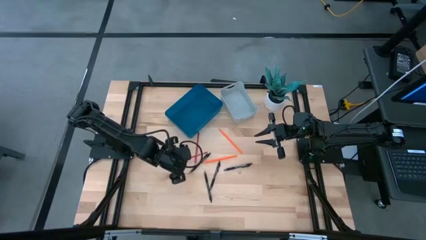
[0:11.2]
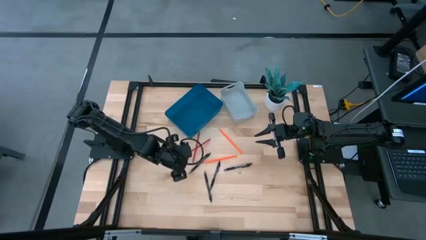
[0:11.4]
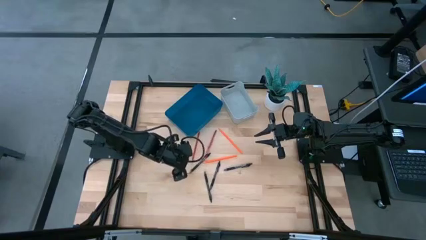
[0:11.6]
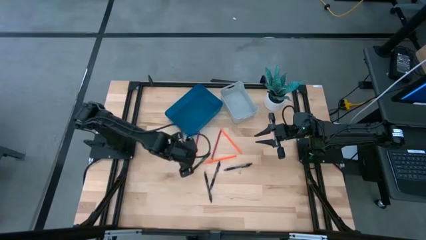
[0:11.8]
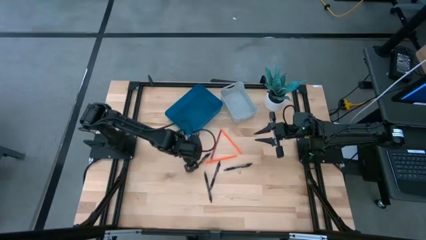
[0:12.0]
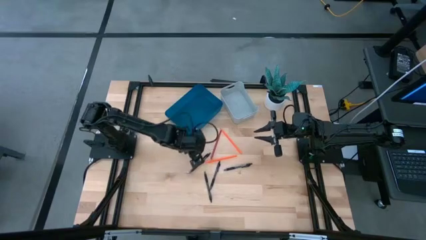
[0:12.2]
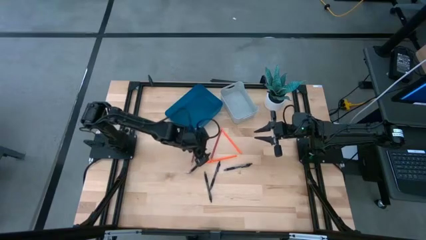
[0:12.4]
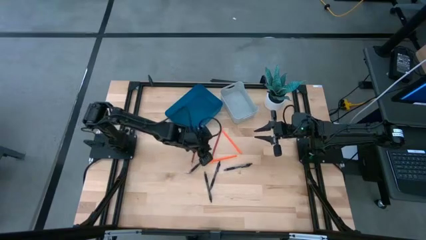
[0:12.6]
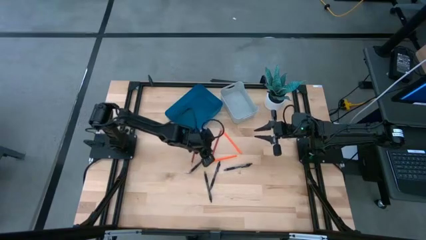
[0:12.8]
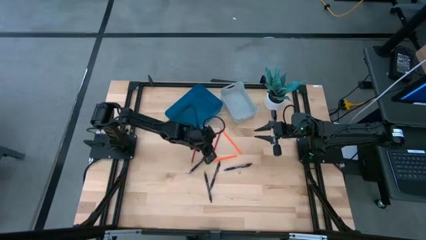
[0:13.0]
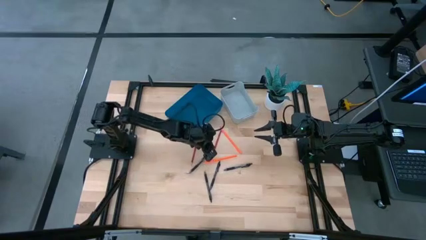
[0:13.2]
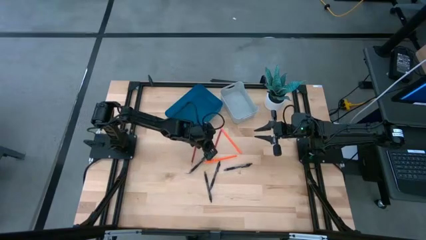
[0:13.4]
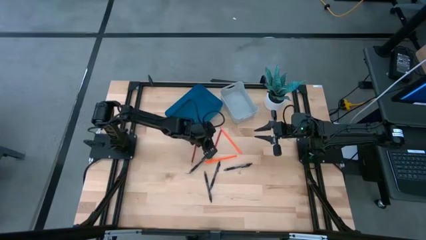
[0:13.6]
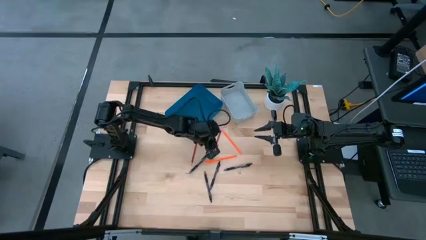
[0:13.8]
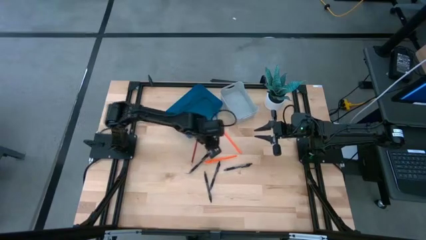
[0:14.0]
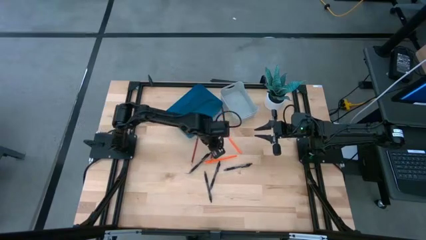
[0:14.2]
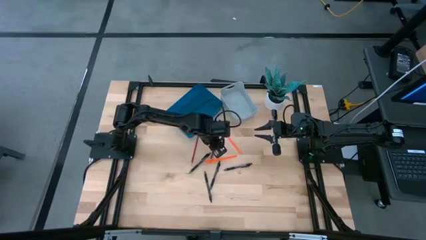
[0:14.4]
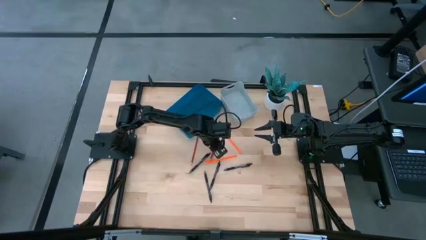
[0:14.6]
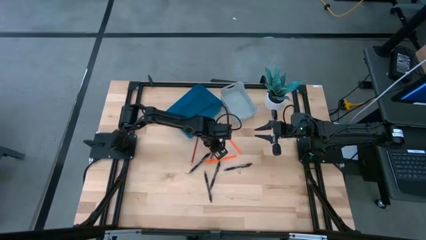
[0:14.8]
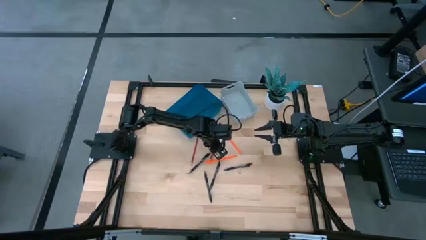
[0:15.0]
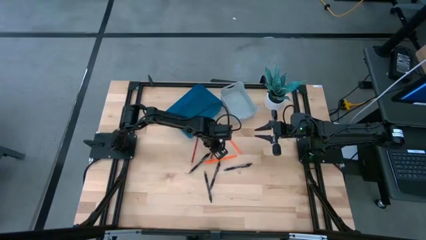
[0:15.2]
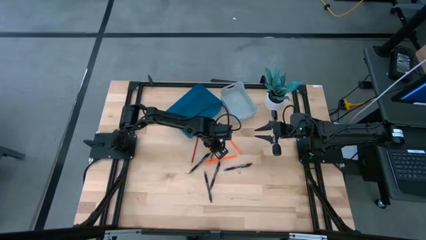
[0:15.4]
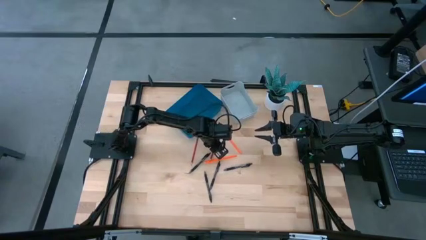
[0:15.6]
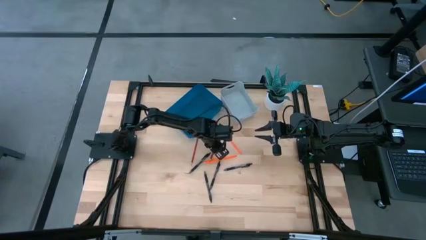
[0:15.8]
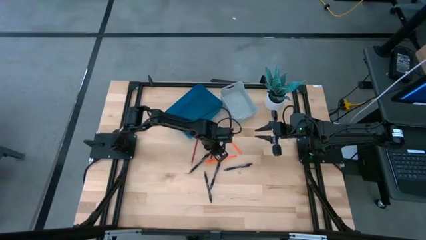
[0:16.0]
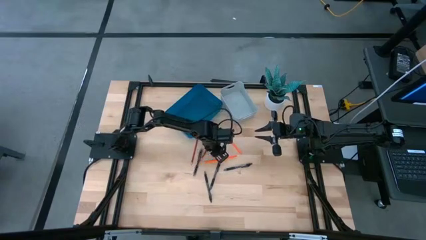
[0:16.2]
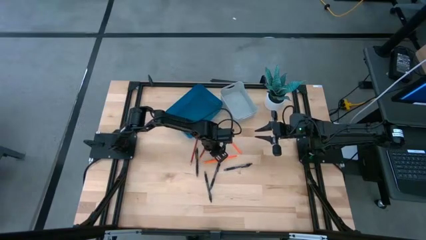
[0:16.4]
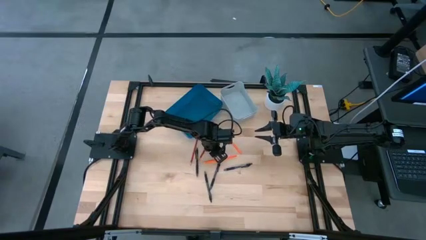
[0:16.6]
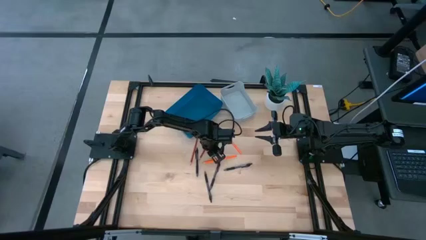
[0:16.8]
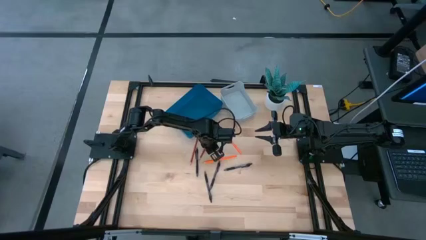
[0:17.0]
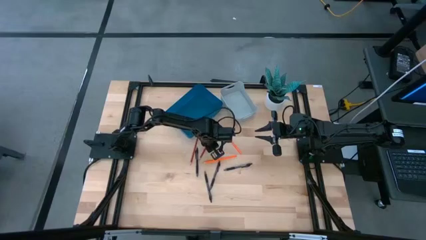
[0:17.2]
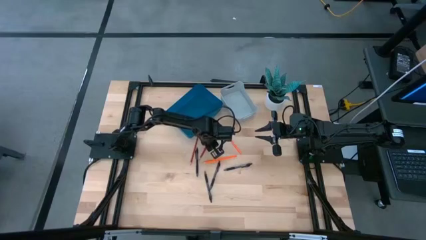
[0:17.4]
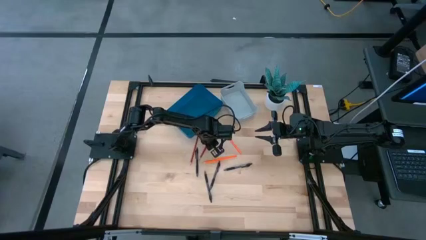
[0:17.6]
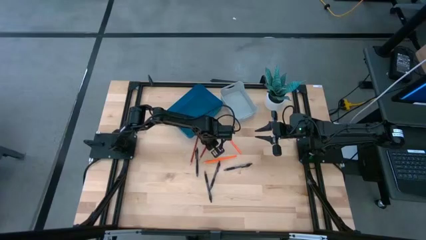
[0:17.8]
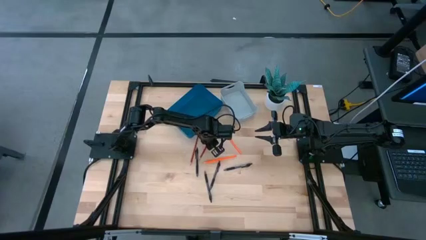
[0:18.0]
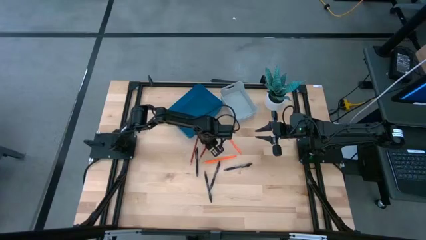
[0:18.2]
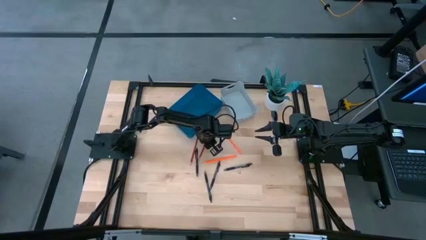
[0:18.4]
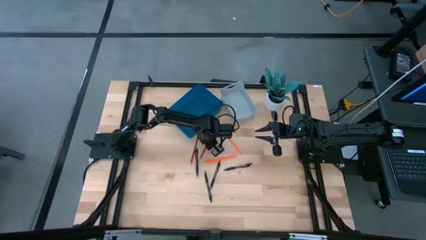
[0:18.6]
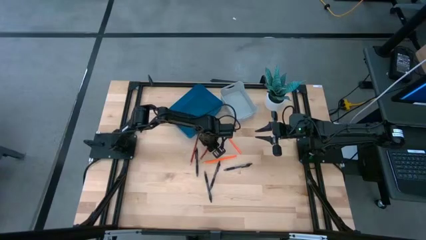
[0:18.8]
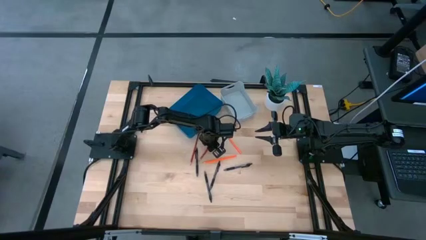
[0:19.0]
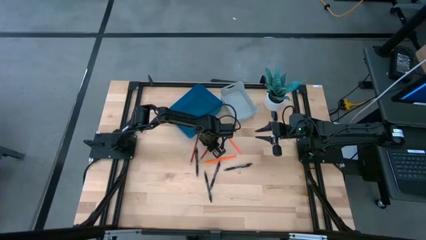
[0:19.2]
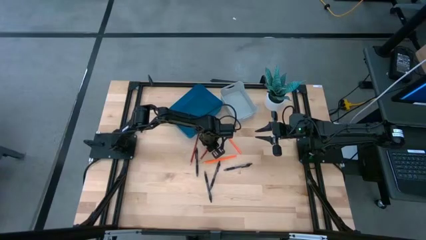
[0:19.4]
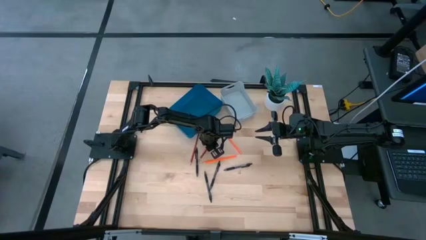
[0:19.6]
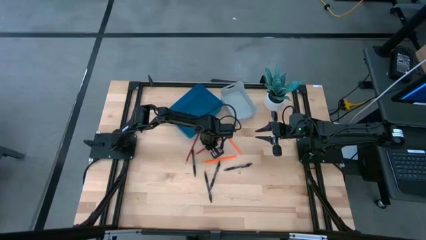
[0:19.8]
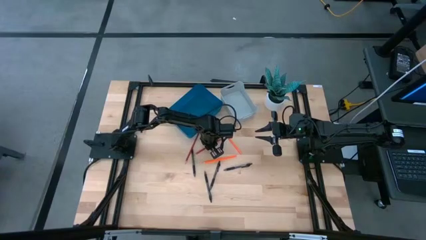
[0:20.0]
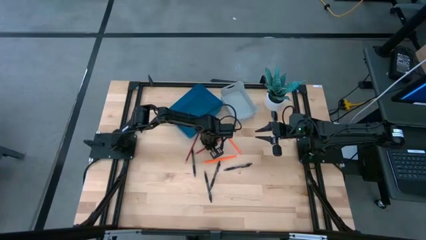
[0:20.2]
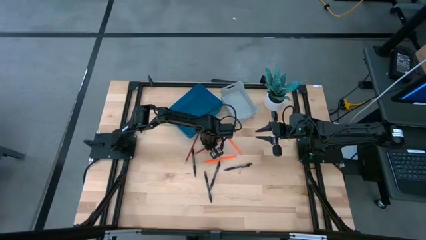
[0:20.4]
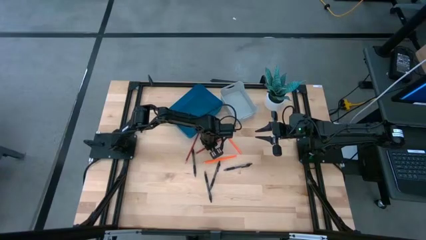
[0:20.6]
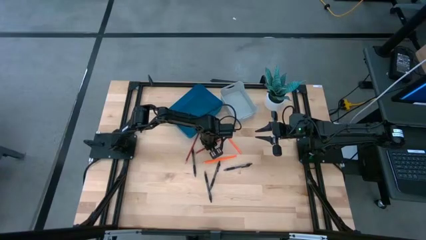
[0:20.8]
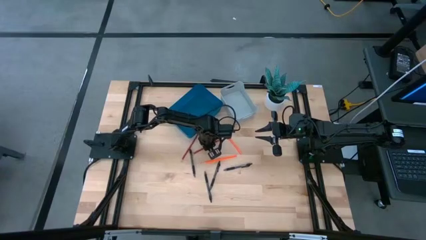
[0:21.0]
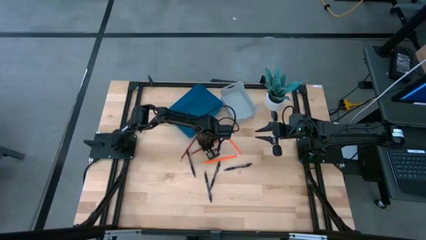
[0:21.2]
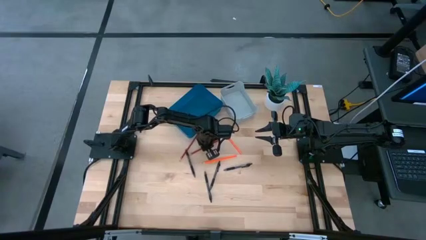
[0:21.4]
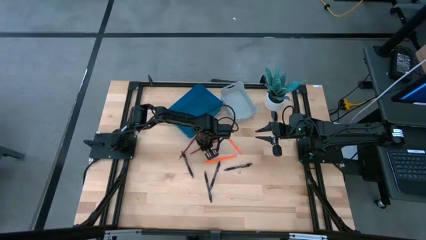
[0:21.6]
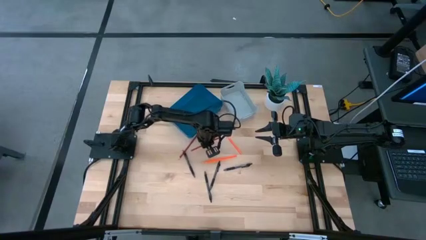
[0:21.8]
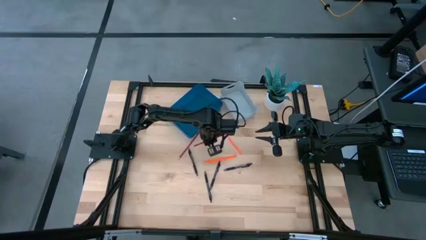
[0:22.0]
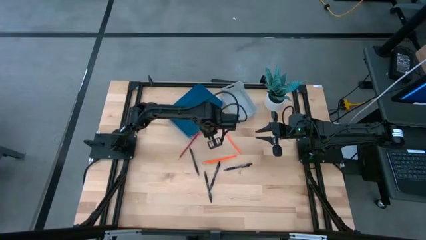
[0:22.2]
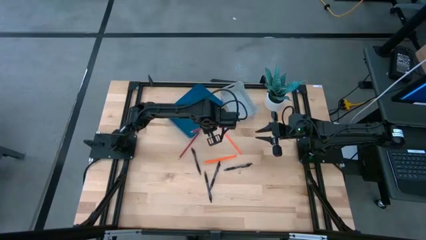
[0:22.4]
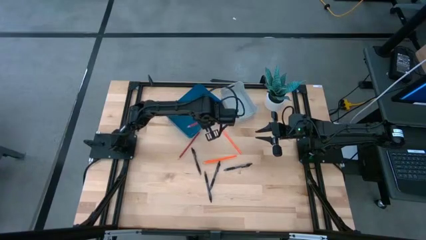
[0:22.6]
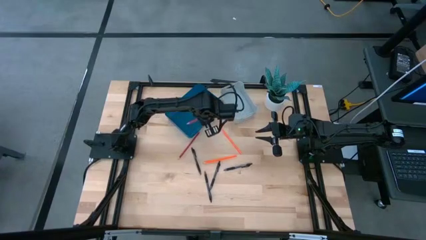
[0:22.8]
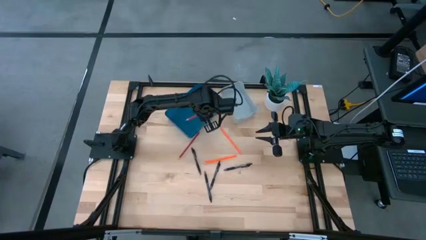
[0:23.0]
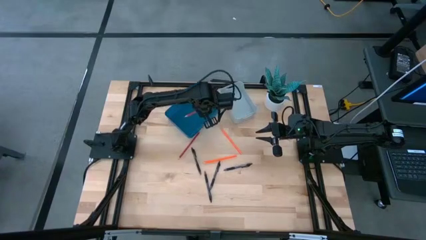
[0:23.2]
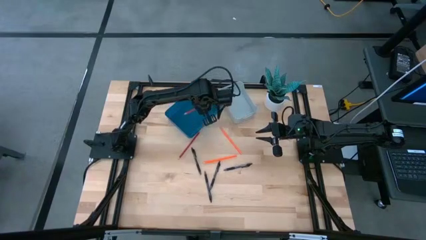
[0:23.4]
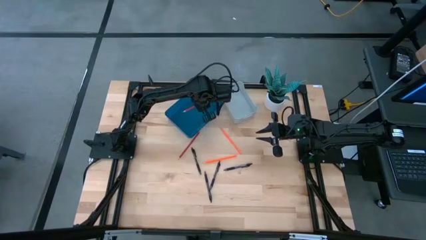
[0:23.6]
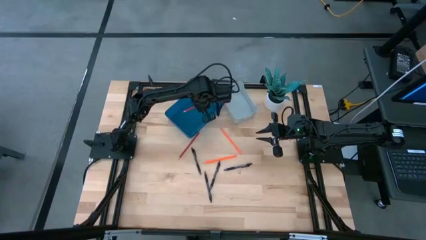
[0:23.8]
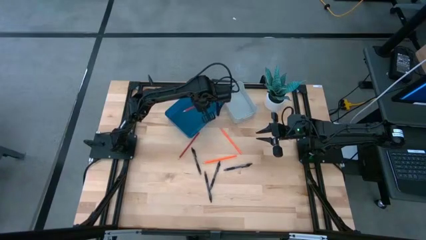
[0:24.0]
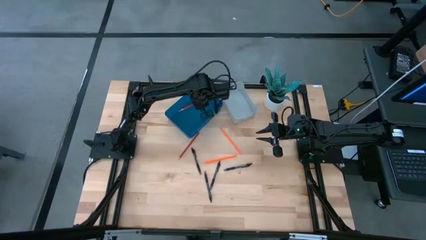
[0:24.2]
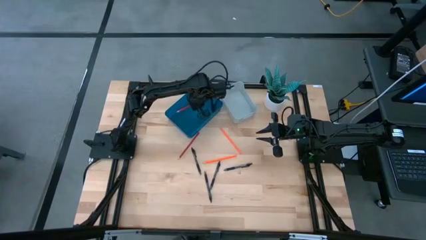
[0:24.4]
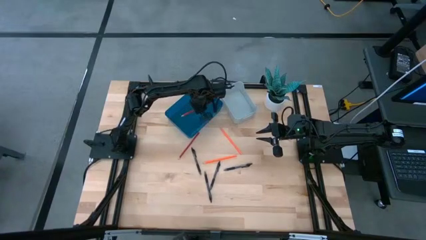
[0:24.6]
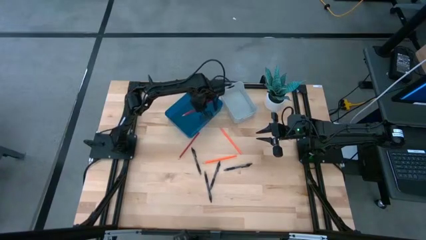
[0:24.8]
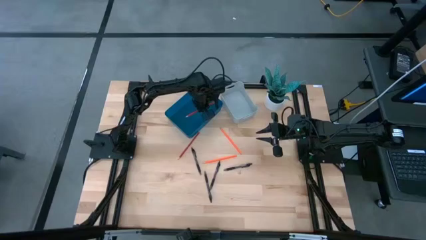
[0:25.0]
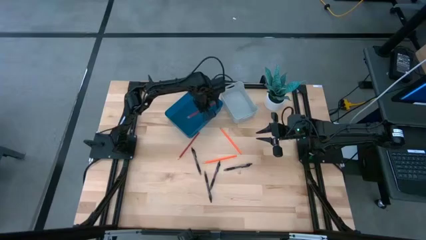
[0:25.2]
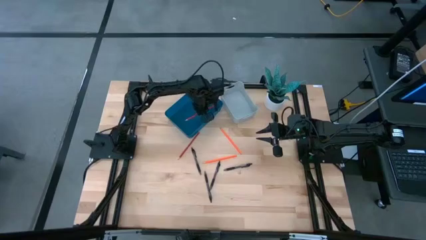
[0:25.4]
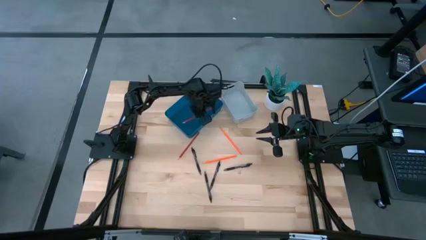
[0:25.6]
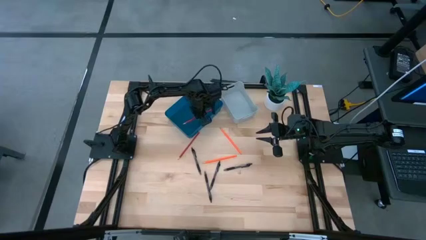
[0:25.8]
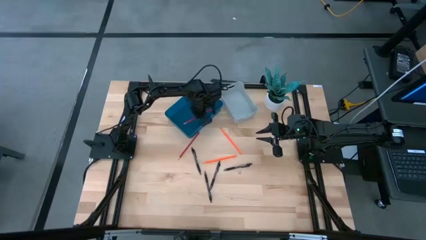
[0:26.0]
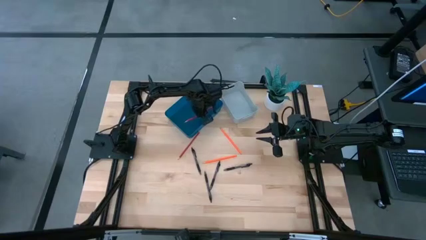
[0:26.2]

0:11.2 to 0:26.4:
Task: Sort pens & pencils
Put the red pencil into the blue bin
